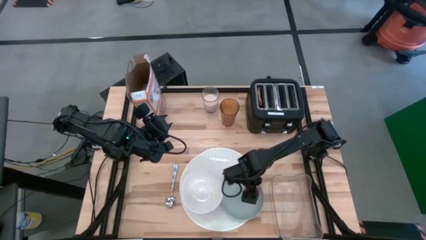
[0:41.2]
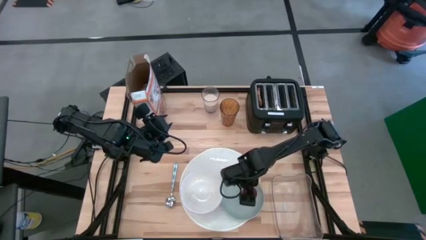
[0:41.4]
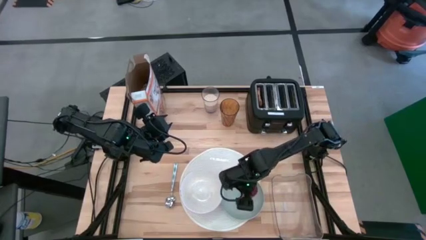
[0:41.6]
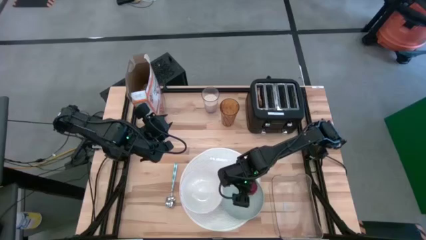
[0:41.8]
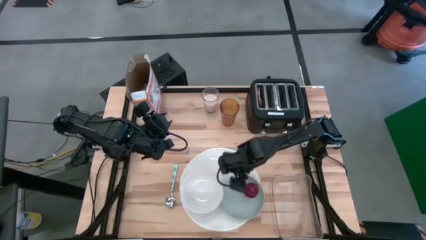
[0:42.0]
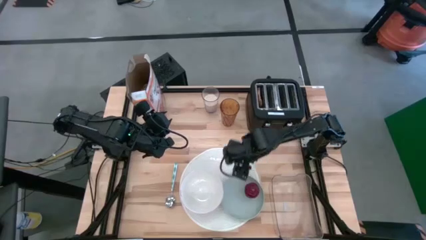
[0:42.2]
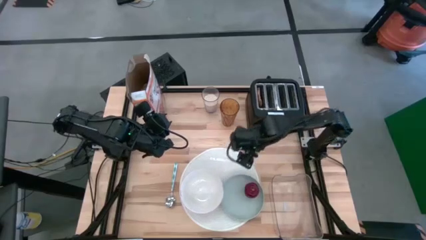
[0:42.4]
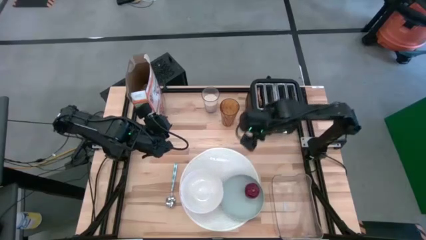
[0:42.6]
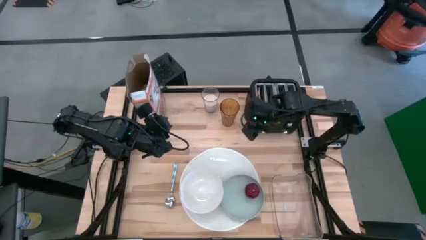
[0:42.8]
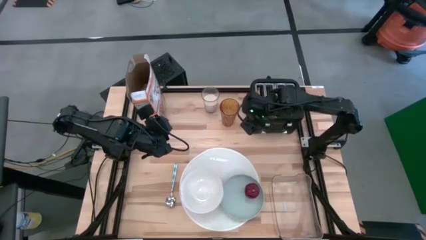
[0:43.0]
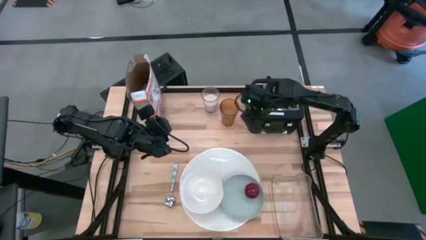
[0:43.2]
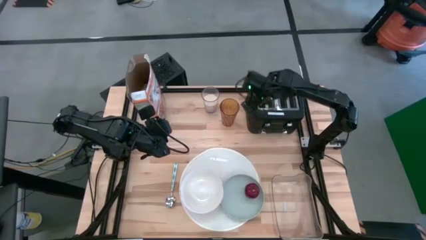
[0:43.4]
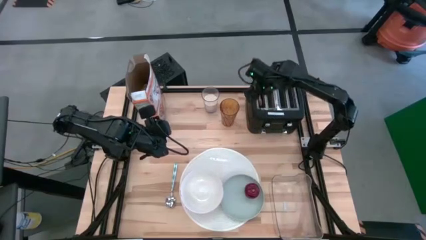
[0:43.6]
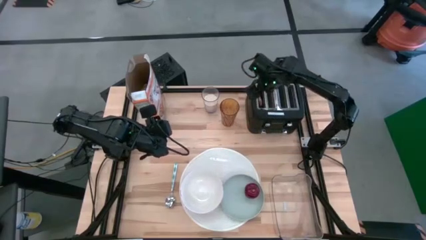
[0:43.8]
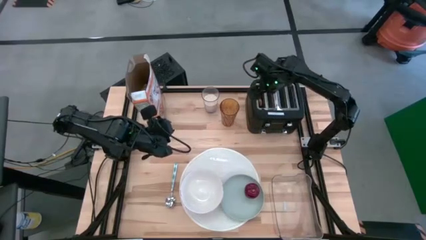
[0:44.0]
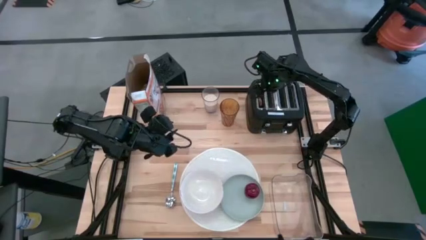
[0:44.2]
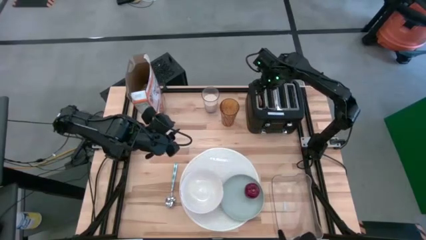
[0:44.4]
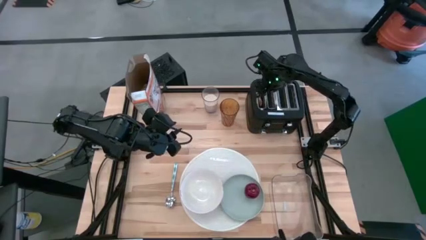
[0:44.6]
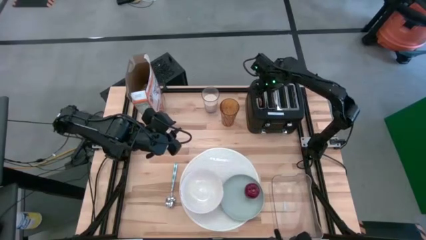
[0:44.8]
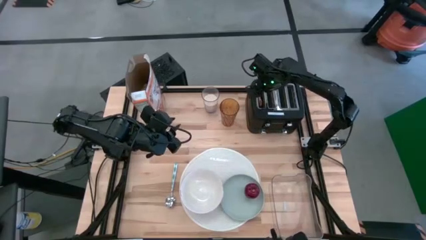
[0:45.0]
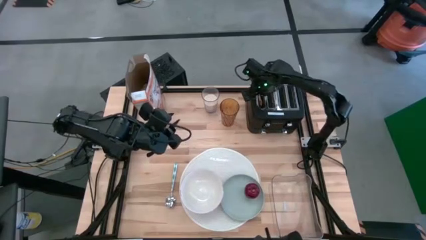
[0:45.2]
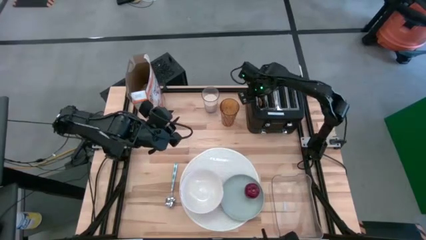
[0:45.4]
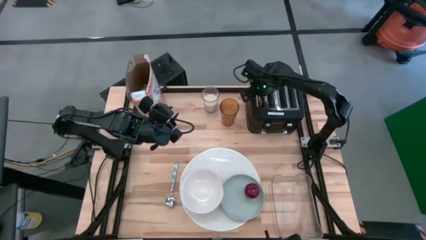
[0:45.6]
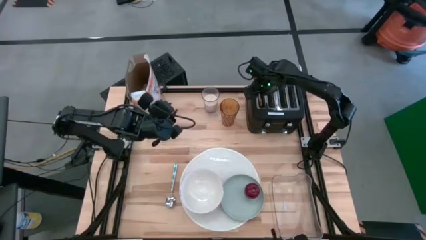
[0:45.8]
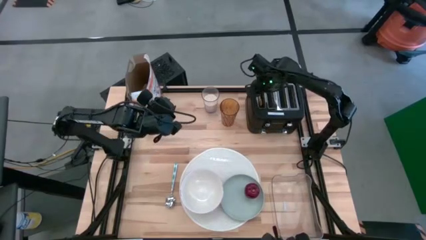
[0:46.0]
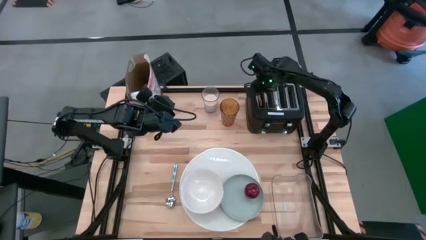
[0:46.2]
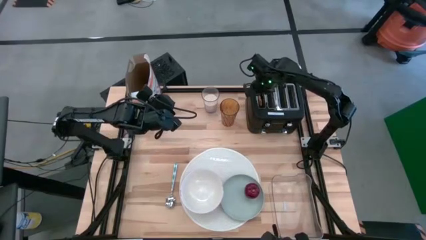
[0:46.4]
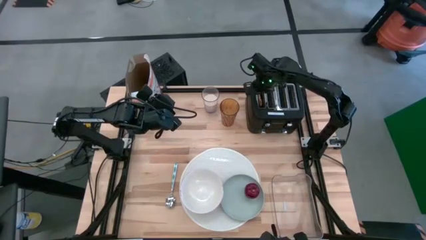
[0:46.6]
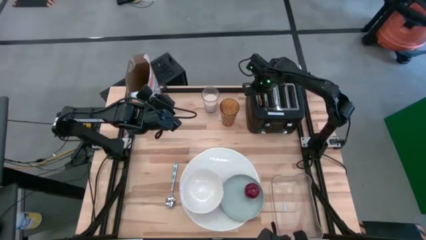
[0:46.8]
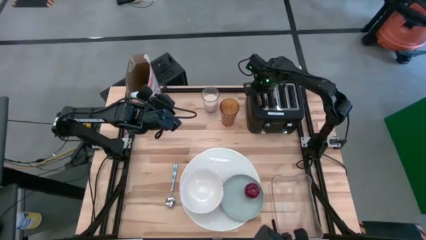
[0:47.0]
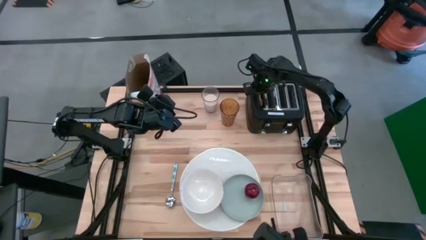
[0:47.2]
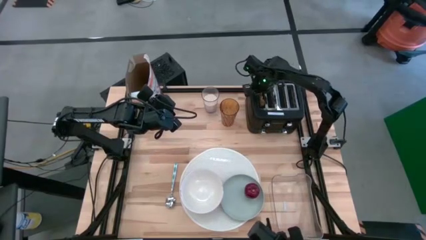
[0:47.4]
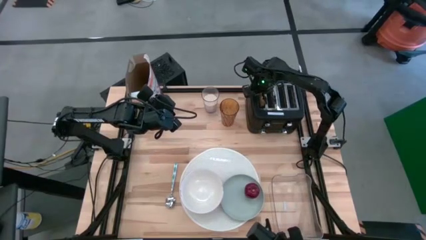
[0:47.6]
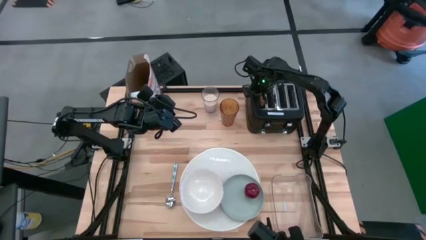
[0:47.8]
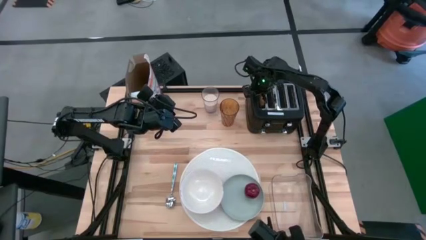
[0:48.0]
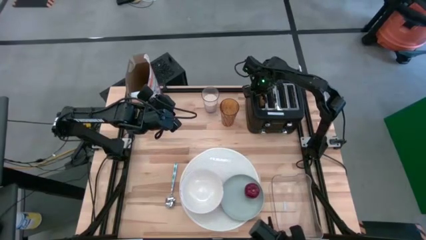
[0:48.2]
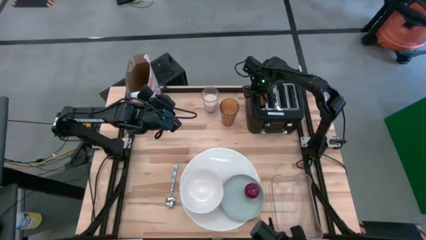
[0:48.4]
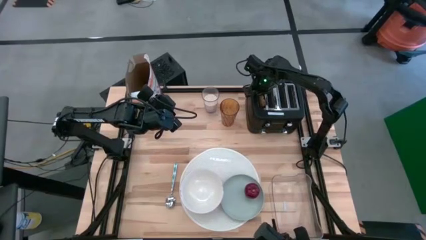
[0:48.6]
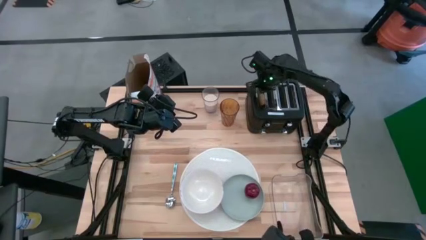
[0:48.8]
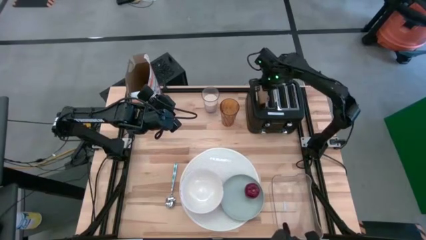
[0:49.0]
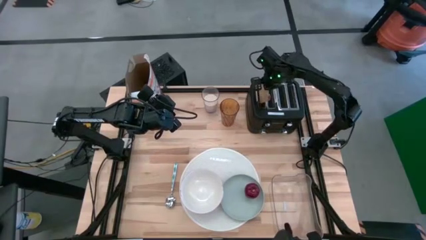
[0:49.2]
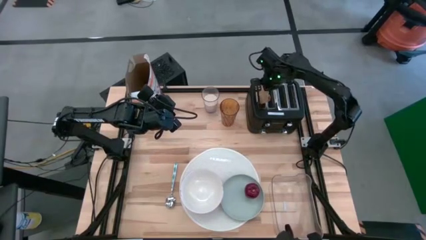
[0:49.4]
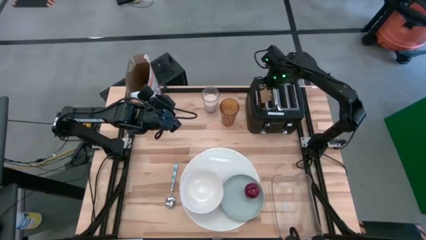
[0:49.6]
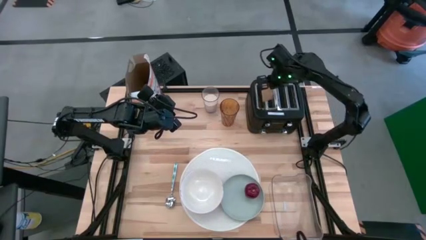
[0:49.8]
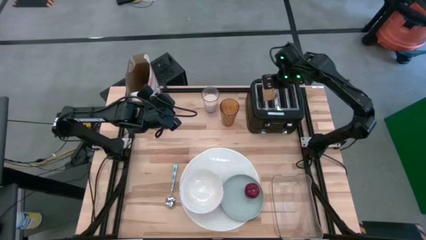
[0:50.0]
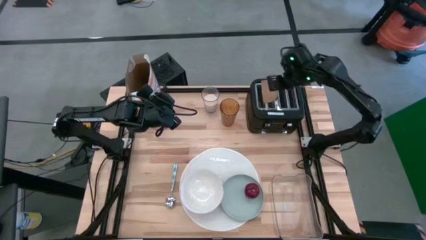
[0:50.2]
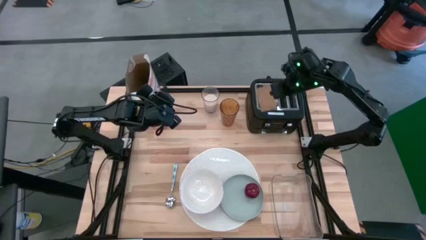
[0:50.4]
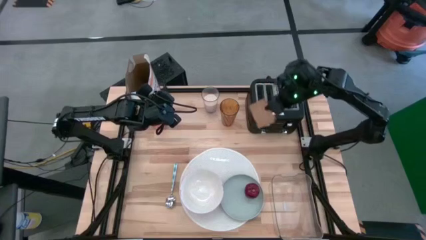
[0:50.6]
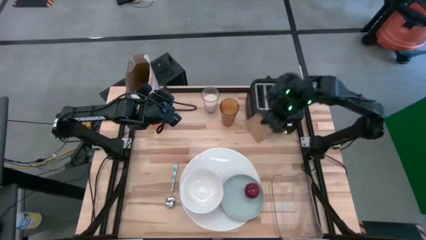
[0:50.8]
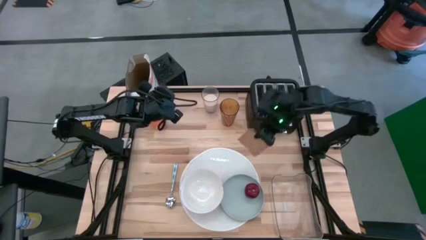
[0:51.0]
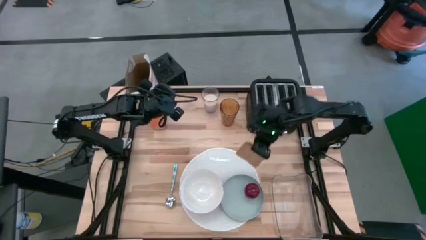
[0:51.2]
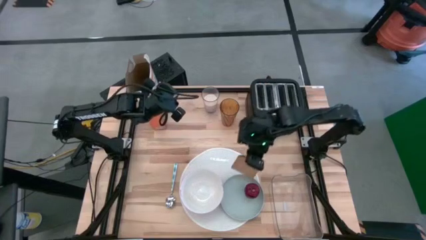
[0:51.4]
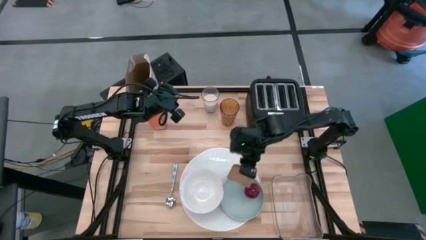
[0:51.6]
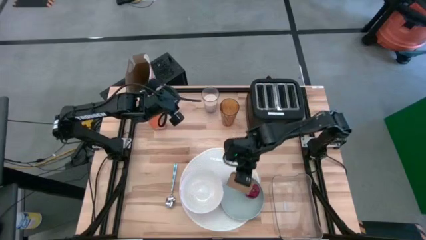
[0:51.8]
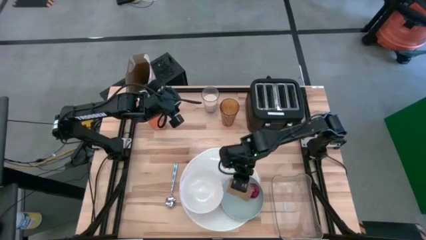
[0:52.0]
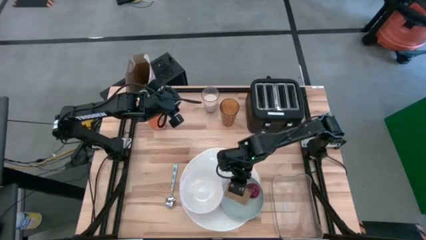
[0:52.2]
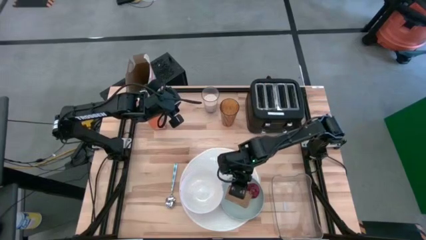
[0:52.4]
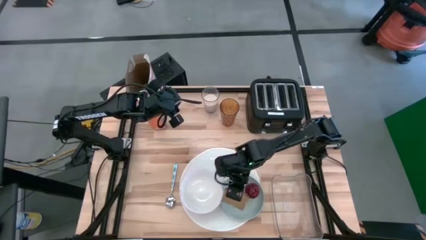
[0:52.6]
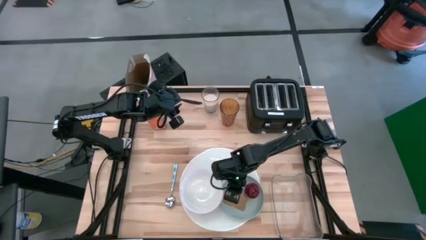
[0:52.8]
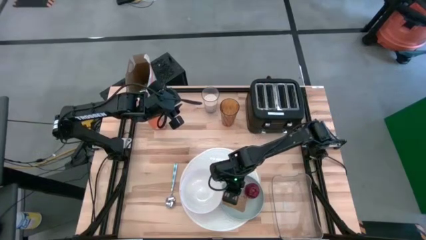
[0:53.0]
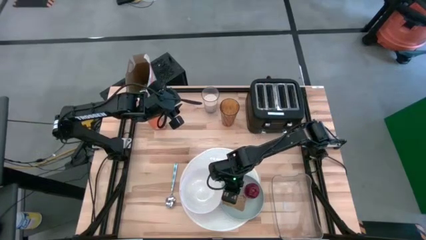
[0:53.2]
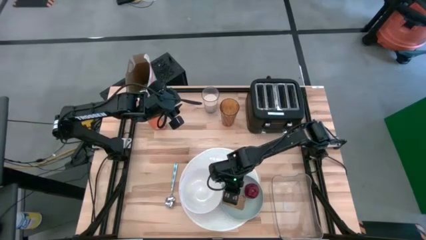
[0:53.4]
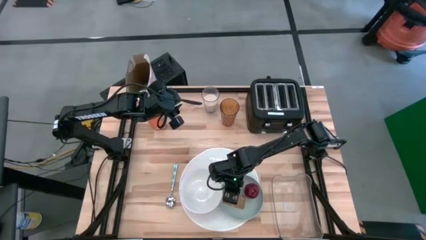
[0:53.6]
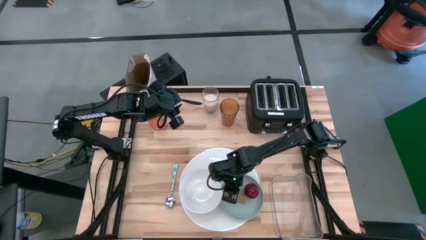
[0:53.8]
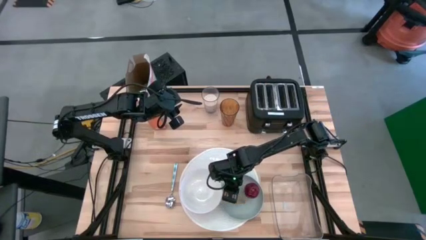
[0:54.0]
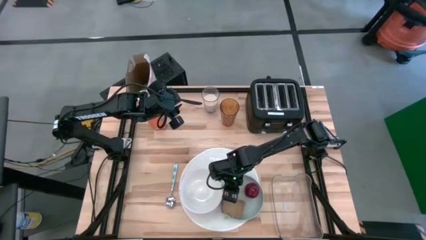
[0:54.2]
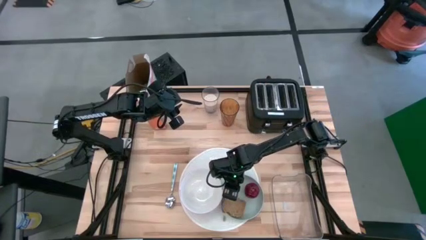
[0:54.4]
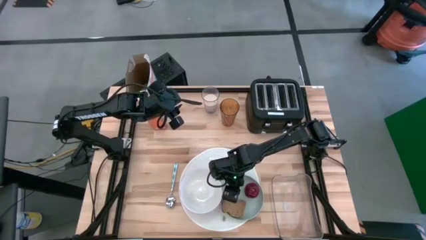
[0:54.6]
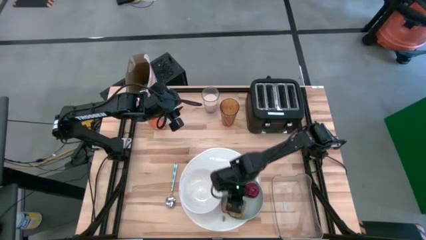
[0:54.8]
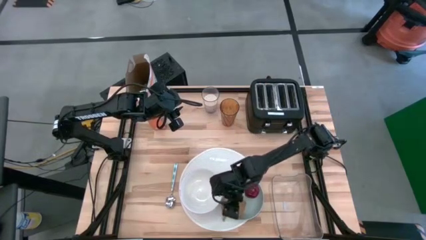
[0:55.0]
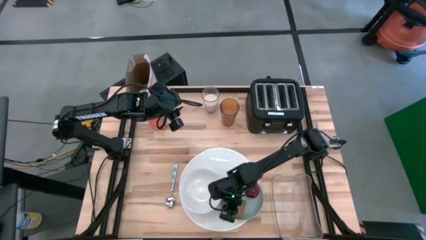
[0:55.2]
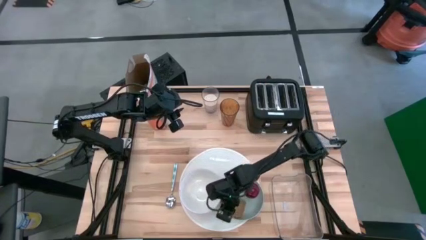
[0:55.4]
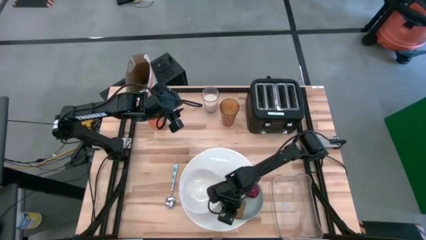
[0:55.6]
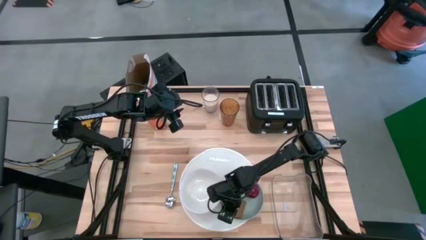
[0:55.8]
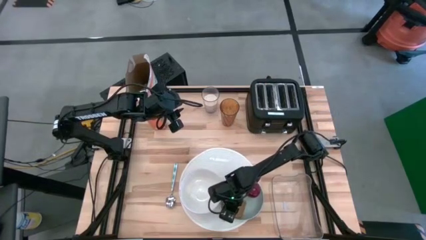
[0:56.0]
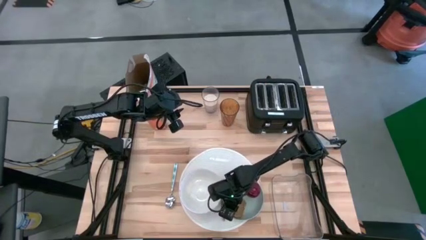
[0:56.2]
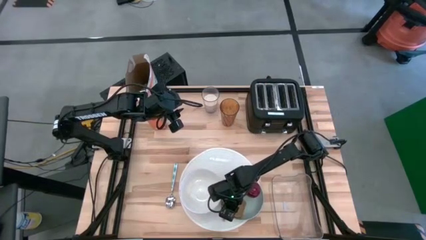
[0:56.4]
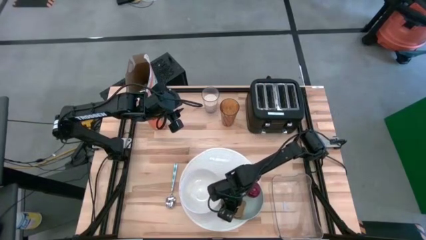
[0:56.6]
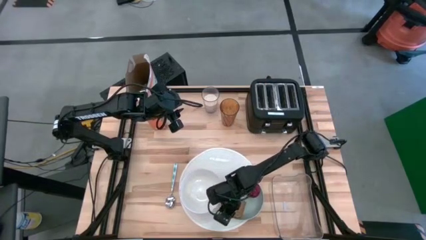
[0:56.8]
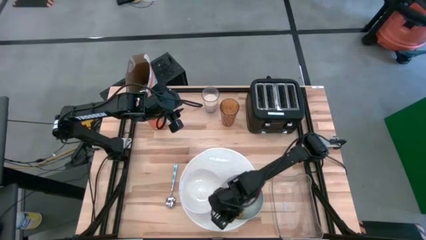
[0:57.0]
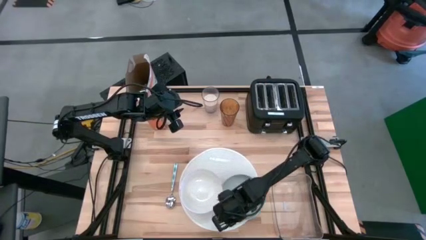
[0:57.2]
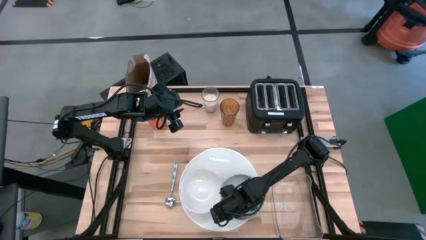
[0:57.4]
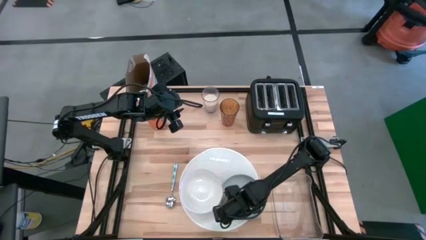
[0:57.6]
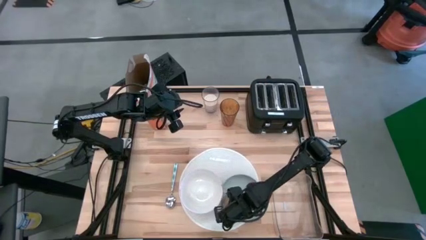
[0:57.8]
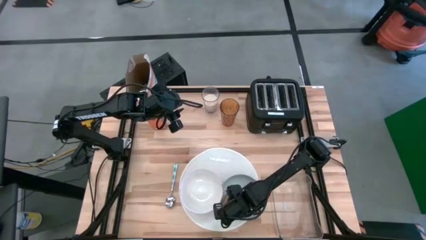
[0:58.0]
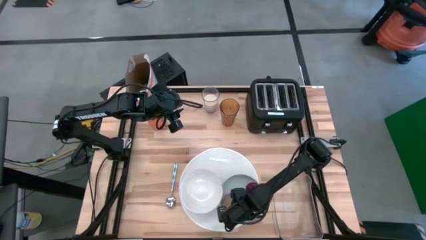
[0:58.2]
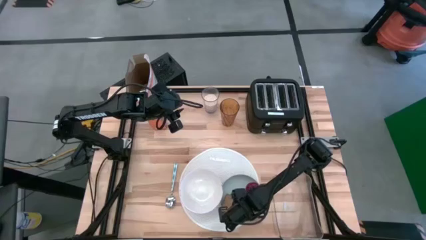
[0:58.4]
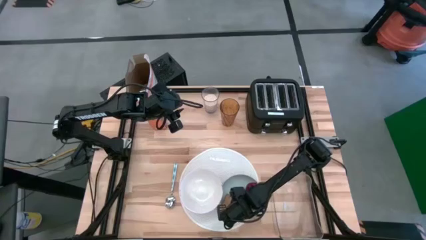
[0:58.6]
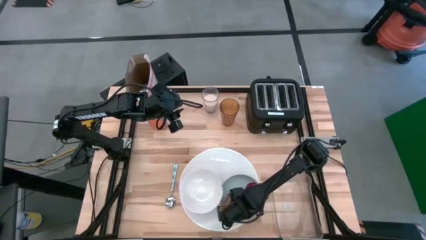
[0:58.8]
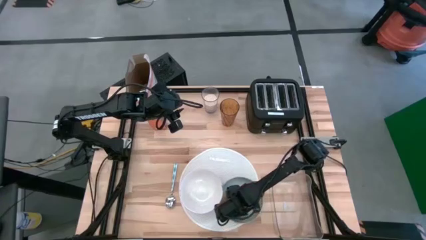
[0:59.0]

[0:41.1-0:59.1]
Task: Arrange a breakfast setting
Put the toasted bread on the blue plate
